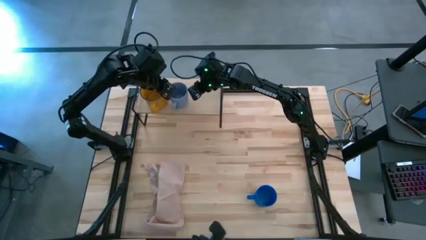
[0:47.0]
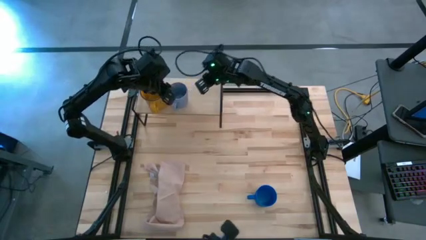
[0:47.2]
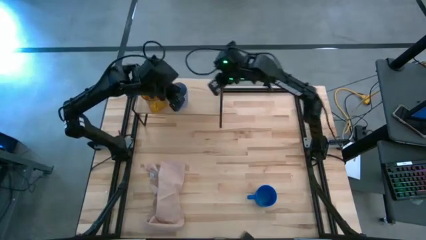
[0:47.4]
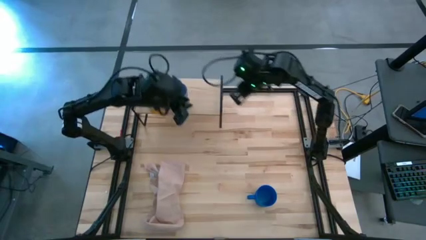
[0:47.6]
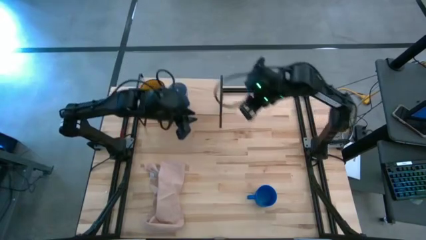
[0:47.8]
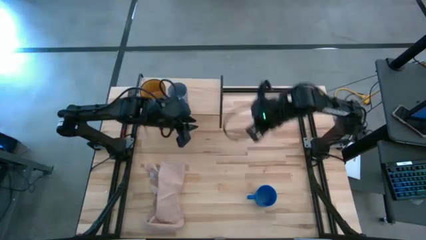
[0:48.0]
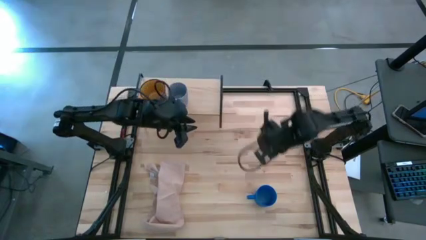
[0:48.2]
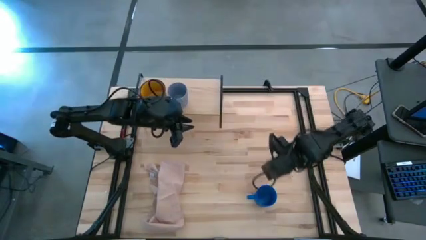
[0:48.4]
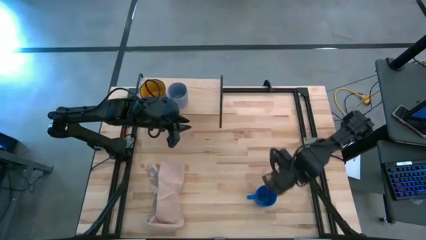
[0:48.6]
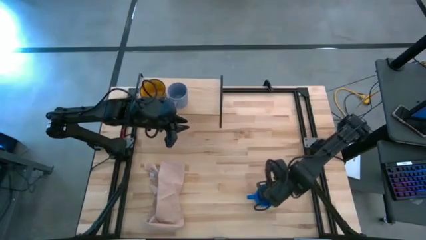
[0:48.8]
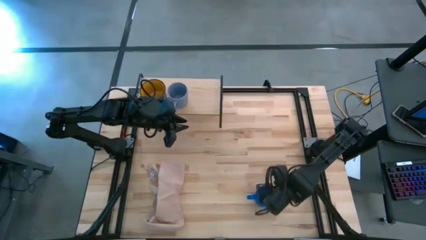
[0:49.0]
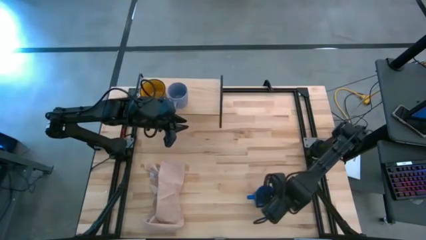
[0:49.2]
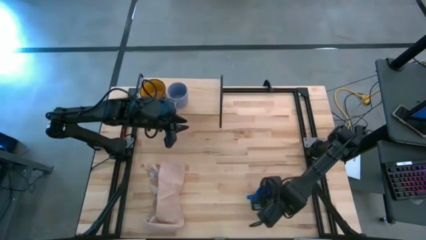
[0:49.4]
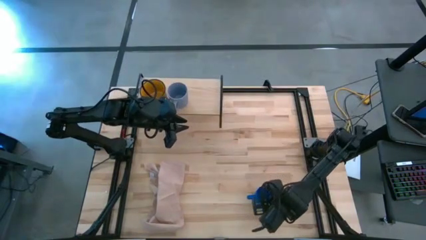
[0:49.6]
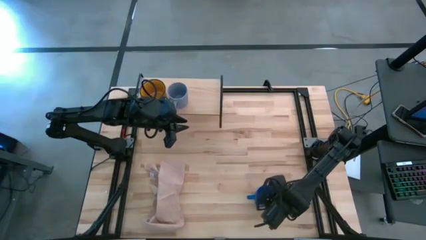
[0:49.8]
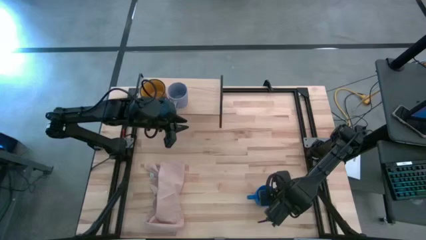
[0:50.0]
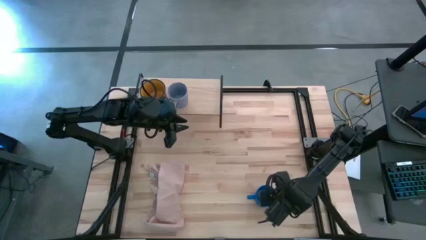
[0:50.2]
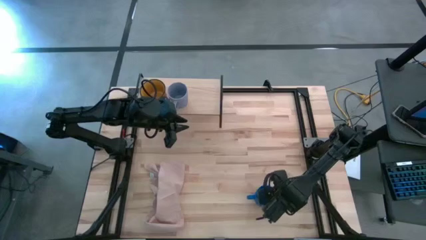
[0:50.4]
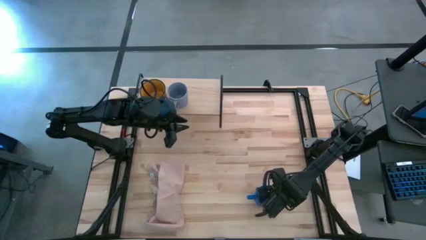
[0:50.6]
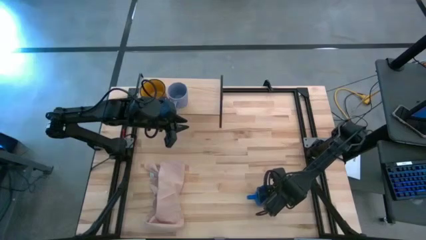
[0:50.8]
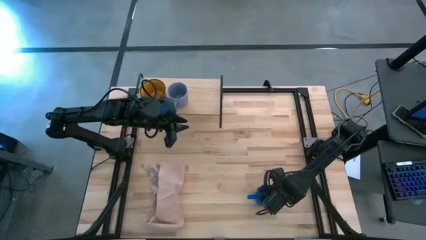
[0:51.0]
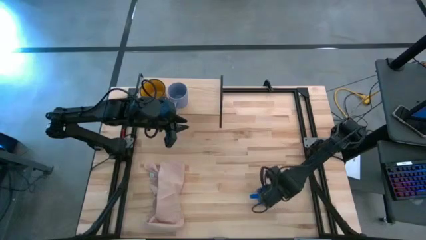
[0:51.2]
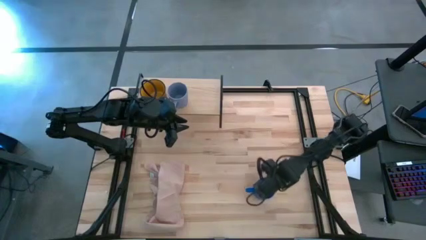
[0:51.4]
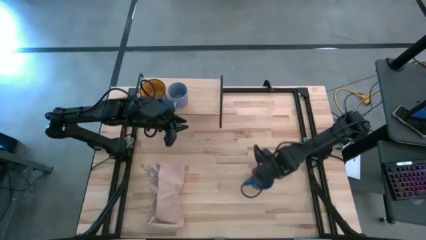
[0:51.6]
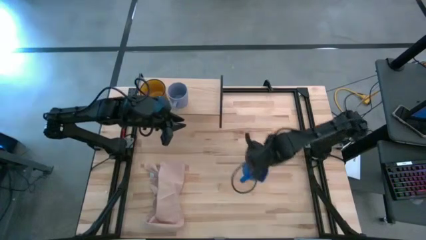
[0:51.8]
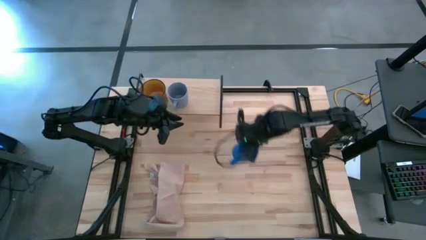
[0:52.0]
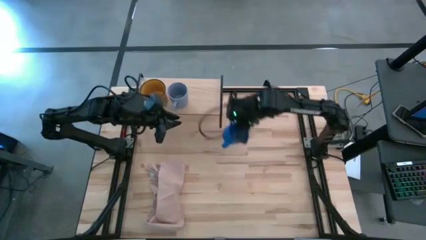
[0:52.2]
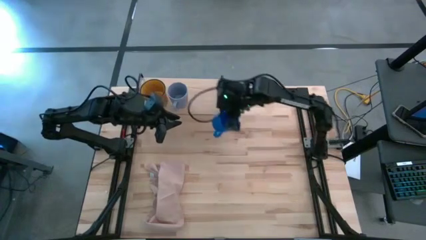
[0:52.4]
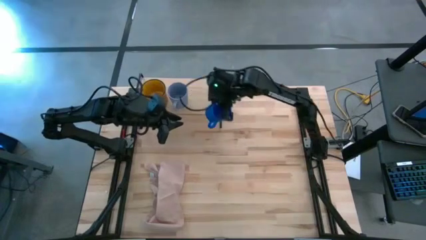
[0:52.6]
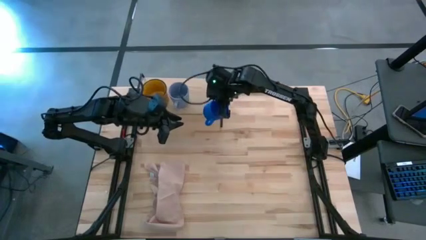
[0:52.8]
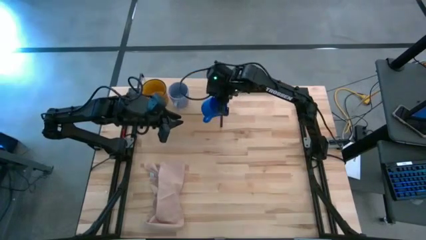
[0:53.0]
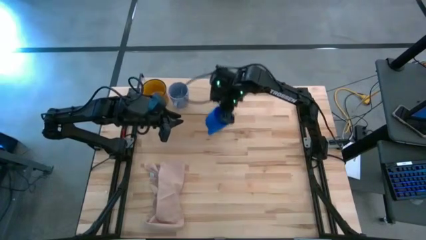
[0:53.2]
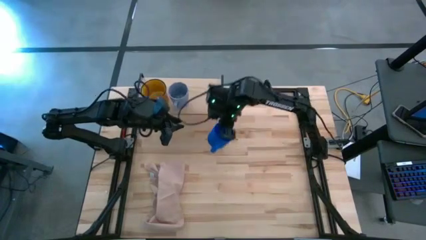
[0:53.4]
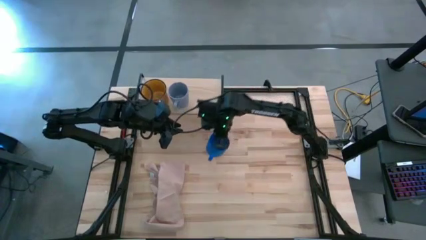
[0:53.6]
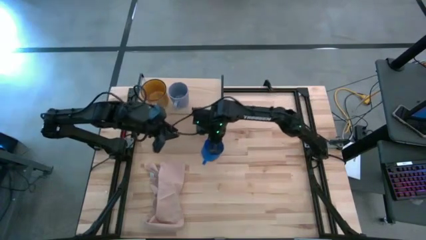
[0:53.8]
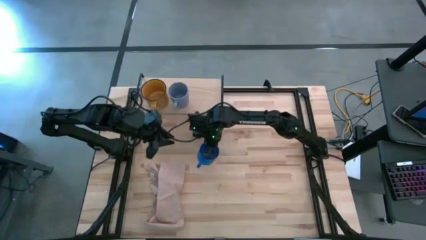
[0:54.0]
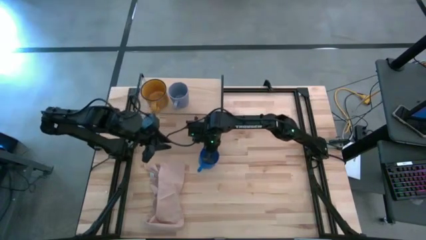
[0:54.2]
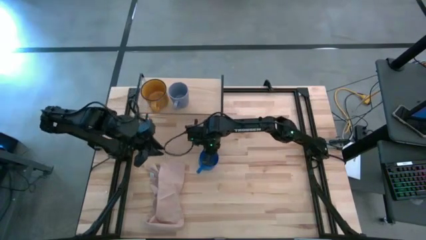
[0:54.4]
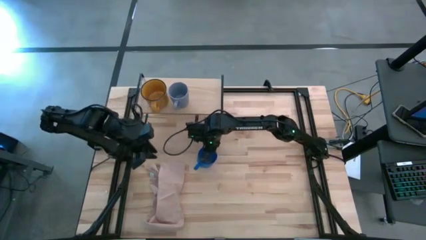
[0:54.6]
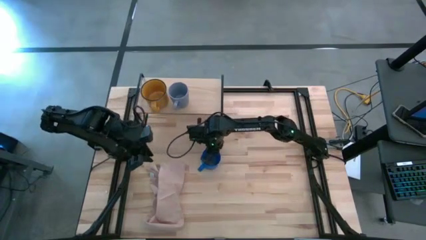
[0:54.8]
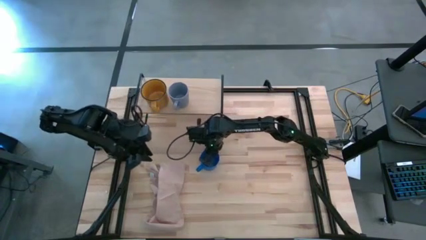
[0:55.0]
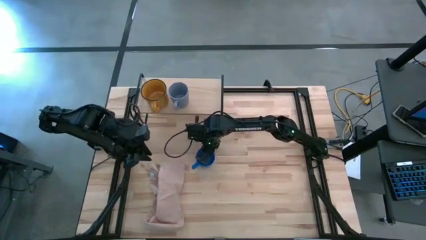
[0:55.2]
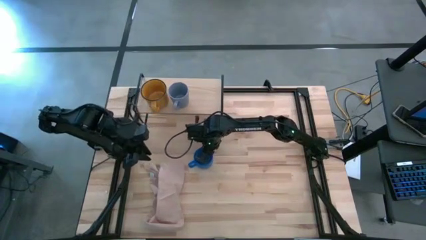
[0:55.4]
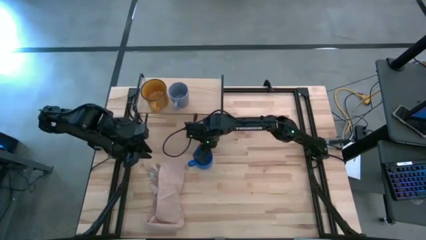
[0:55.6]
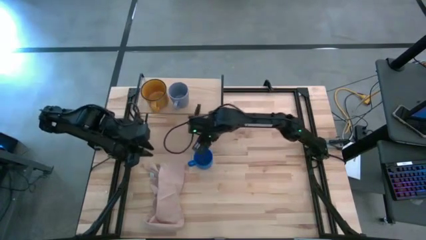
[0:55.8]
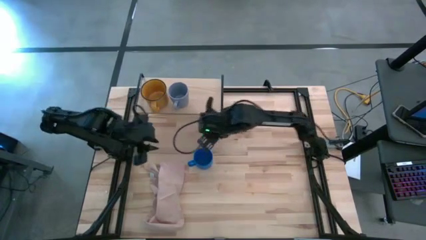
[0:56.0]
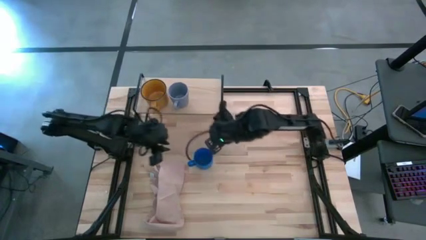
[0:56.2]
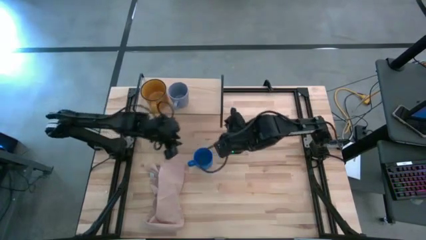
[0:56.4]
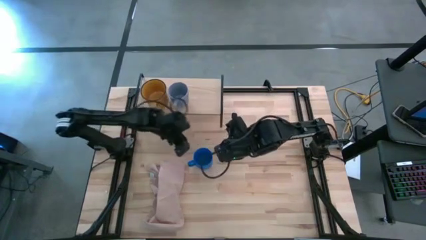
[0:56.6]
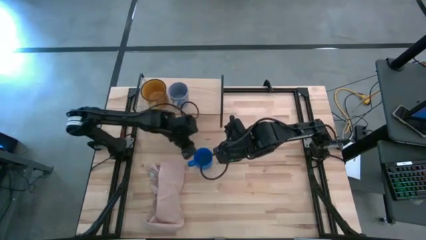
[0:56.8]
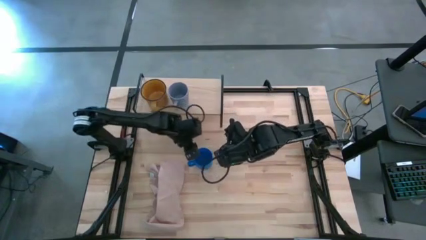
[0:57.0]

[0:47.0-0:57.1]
Task: Stack small to large cups/mugs on shelf
Put the blue mug on the shelf
